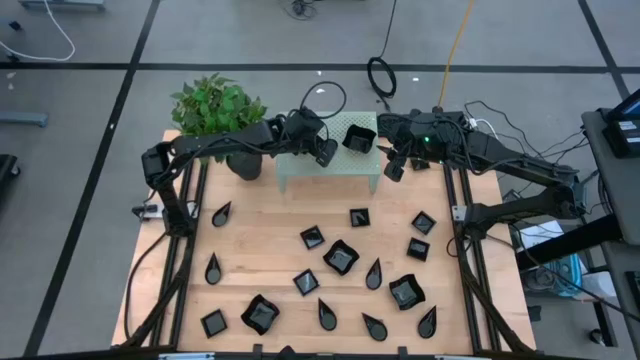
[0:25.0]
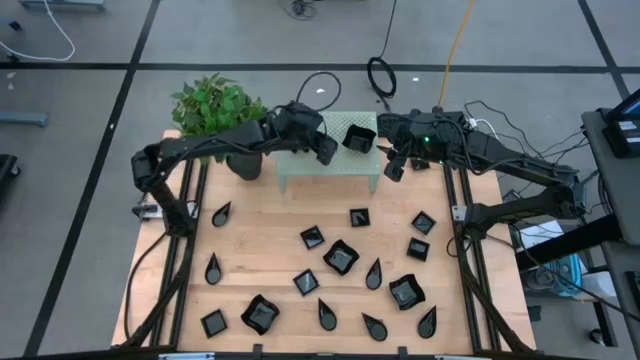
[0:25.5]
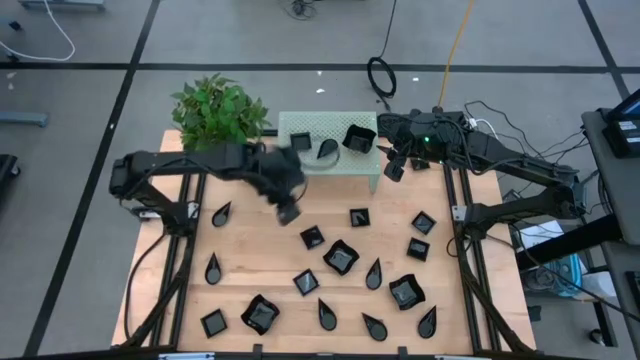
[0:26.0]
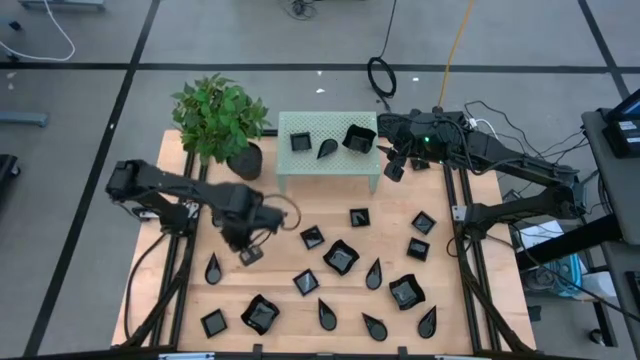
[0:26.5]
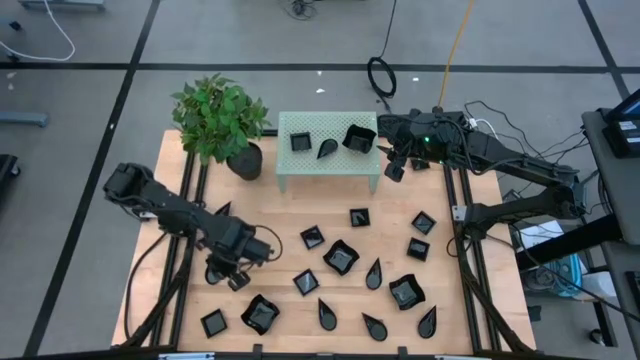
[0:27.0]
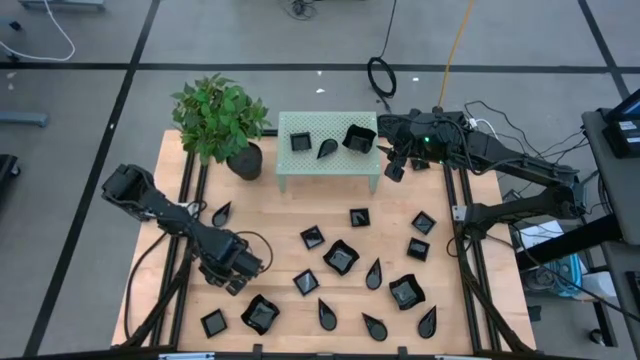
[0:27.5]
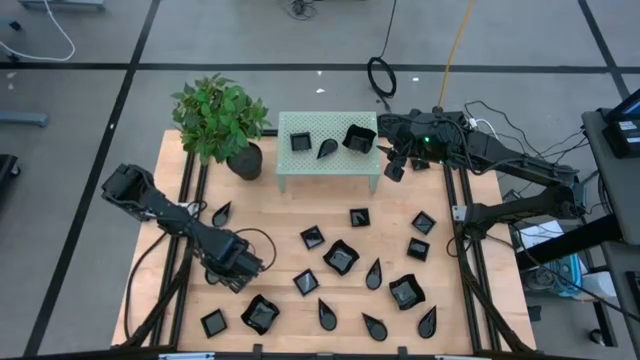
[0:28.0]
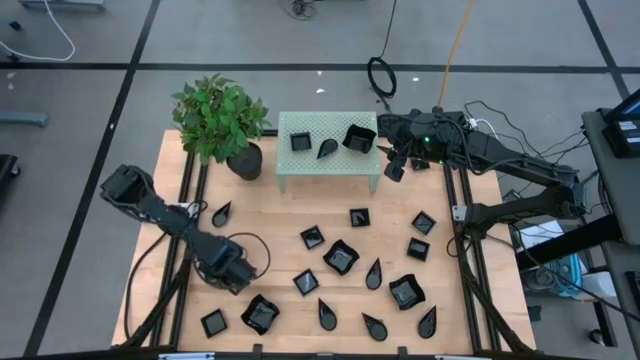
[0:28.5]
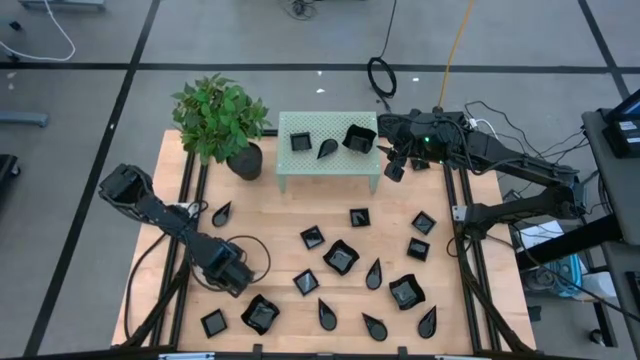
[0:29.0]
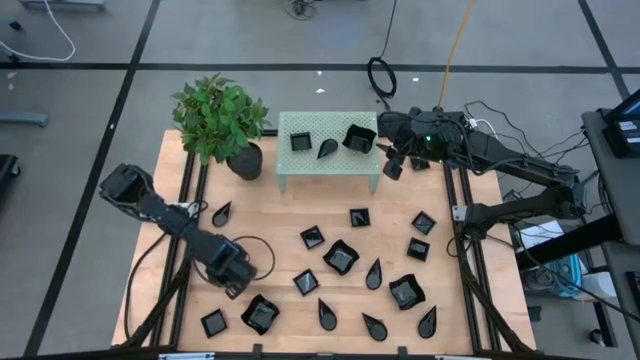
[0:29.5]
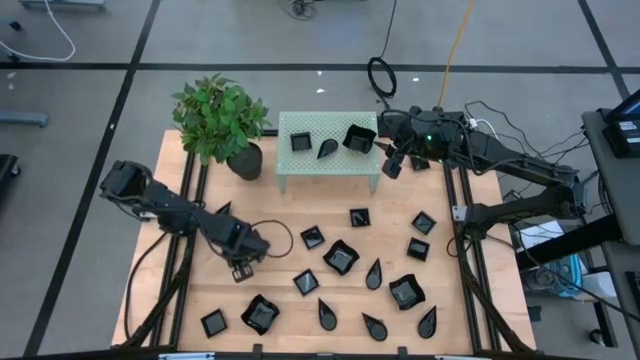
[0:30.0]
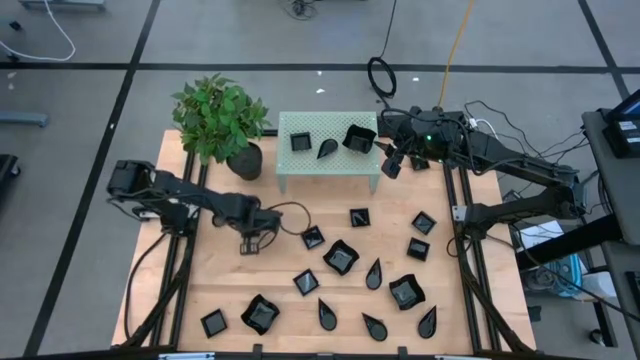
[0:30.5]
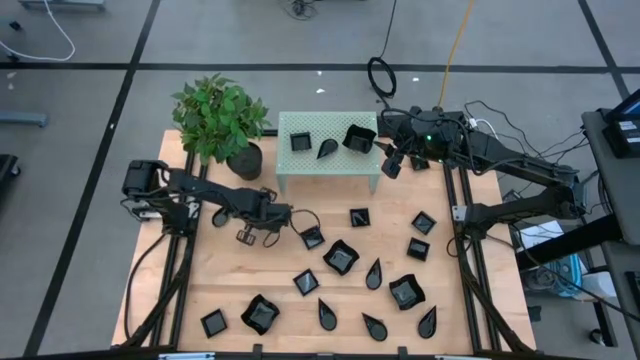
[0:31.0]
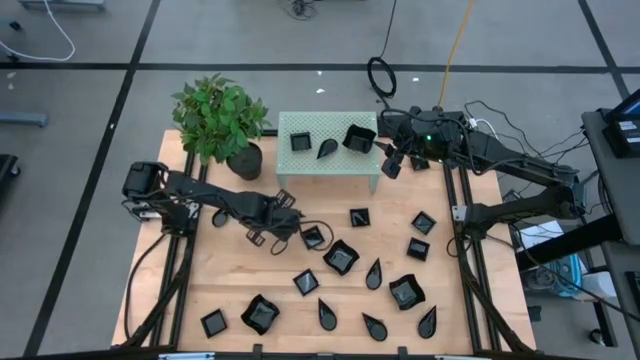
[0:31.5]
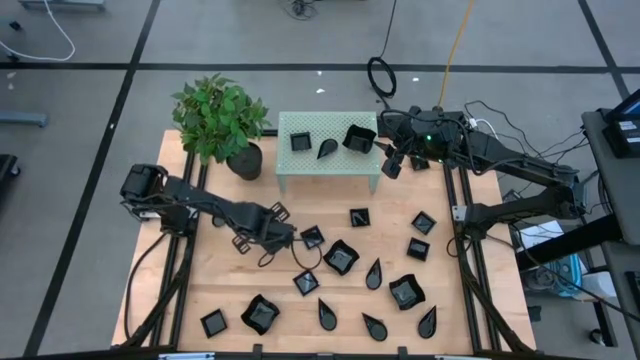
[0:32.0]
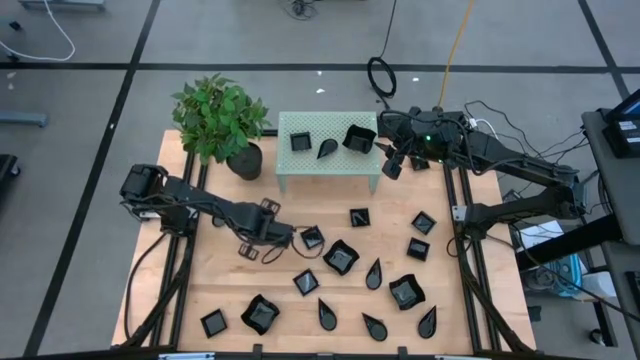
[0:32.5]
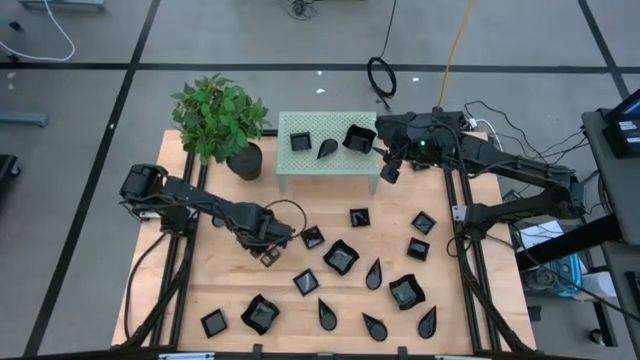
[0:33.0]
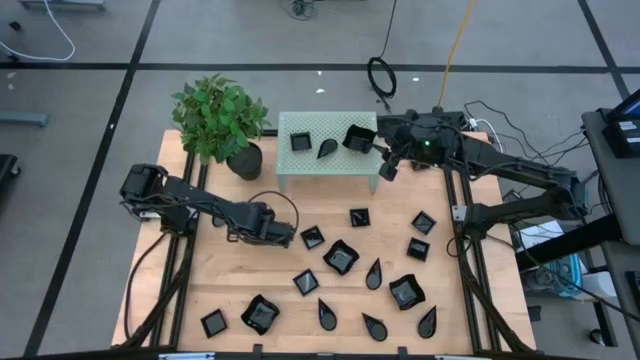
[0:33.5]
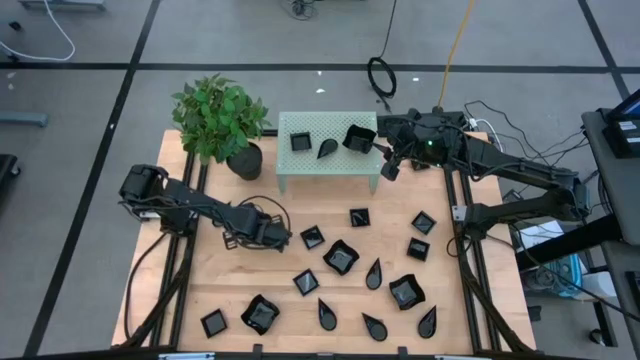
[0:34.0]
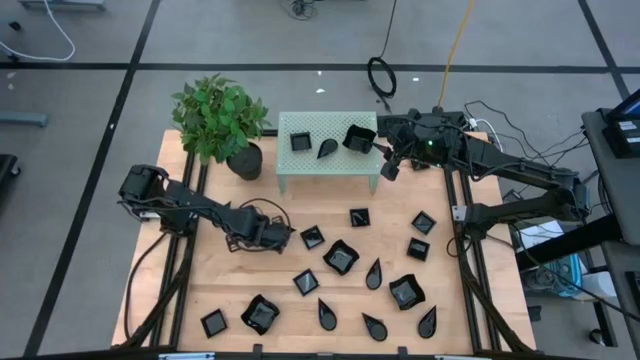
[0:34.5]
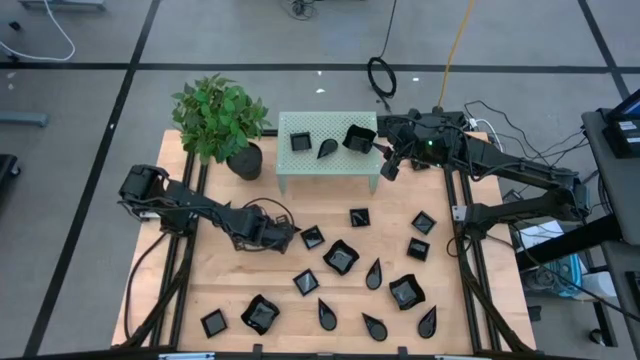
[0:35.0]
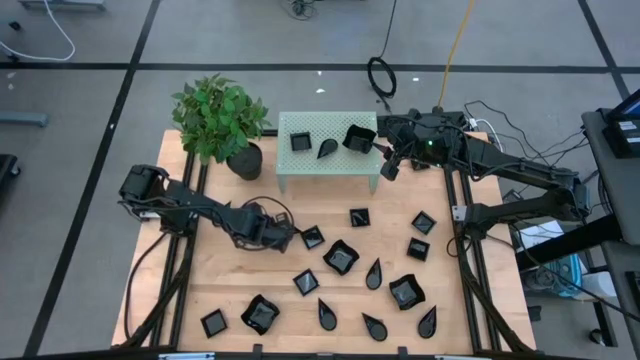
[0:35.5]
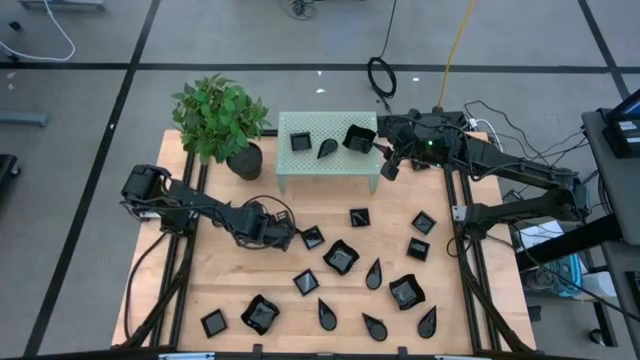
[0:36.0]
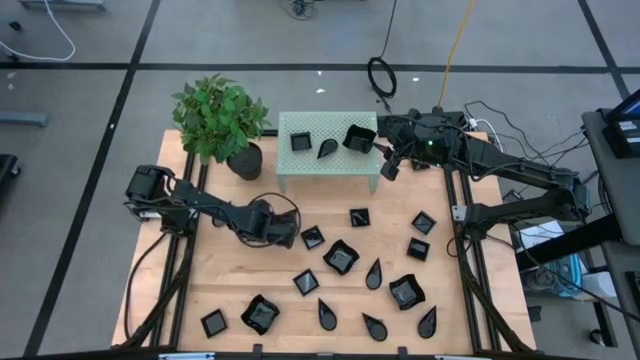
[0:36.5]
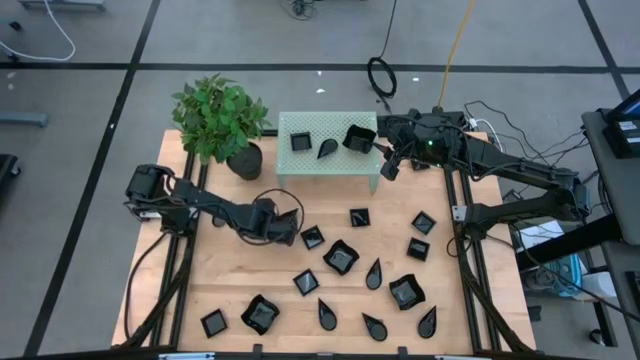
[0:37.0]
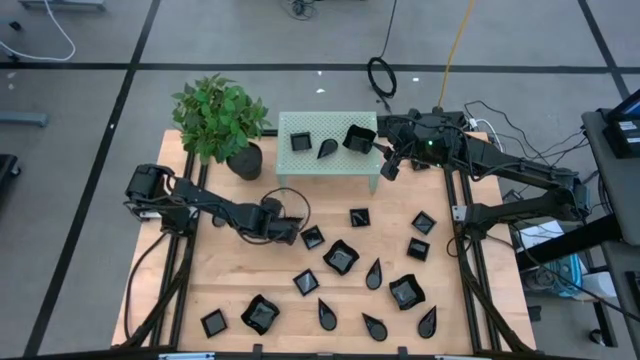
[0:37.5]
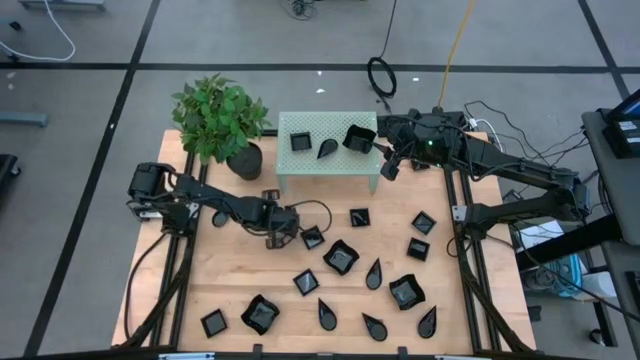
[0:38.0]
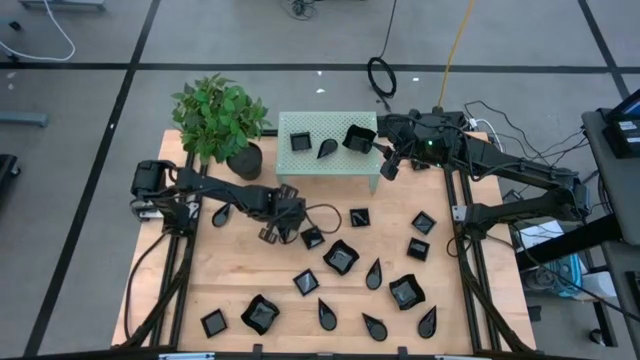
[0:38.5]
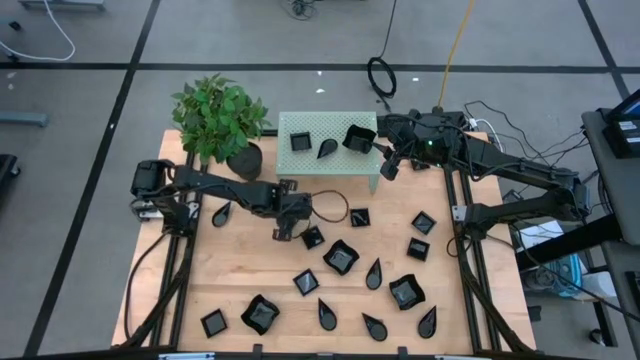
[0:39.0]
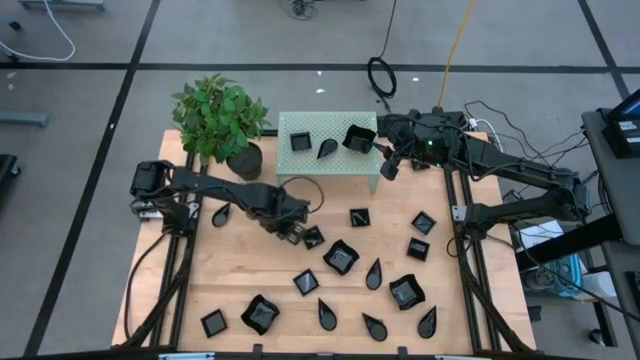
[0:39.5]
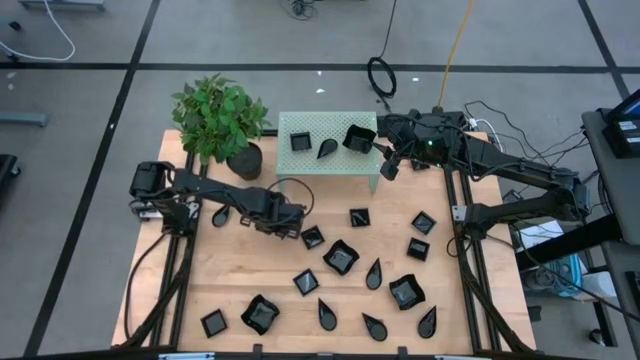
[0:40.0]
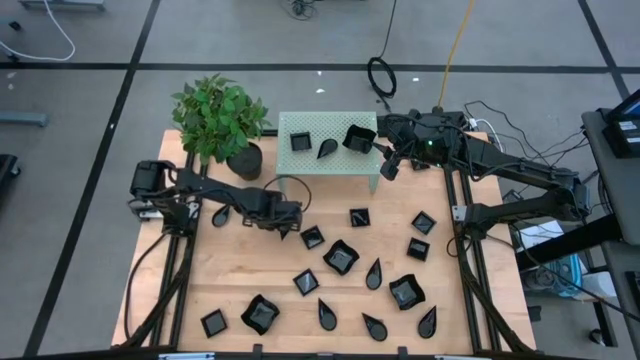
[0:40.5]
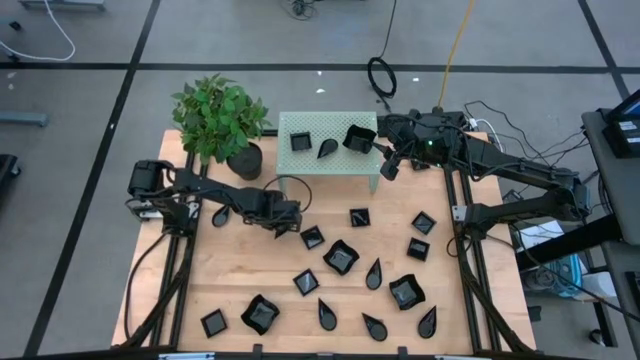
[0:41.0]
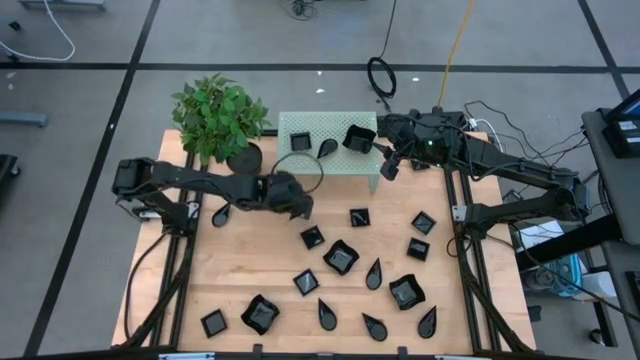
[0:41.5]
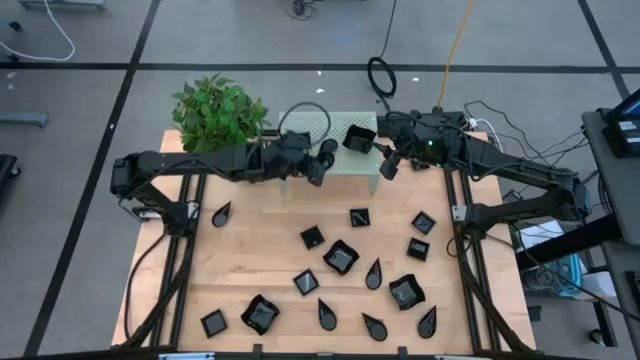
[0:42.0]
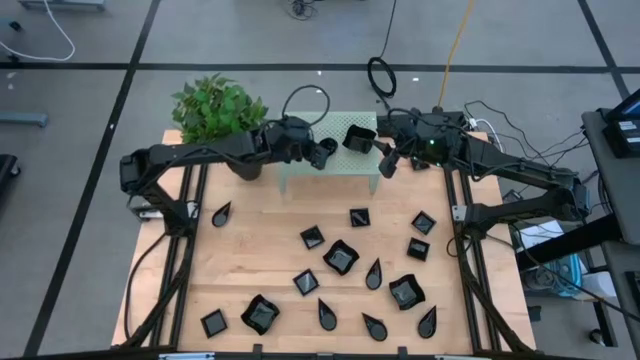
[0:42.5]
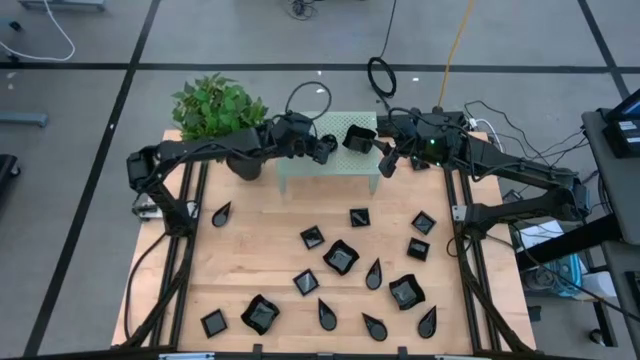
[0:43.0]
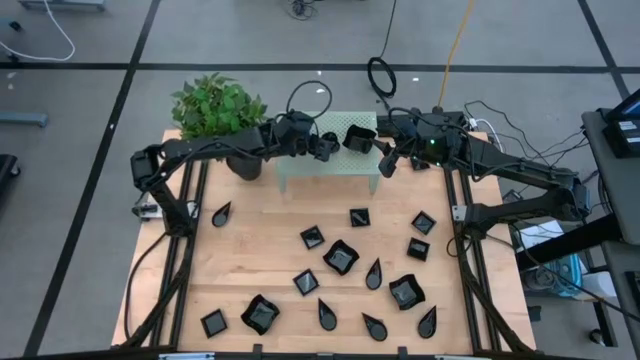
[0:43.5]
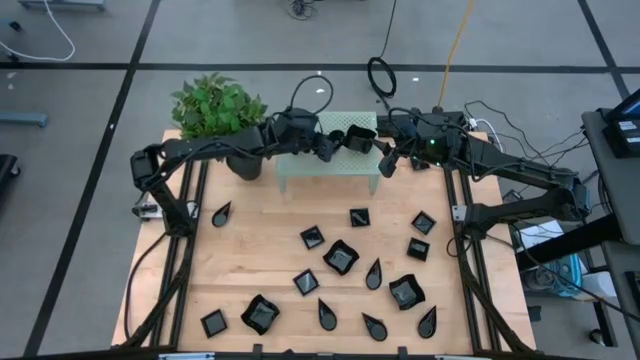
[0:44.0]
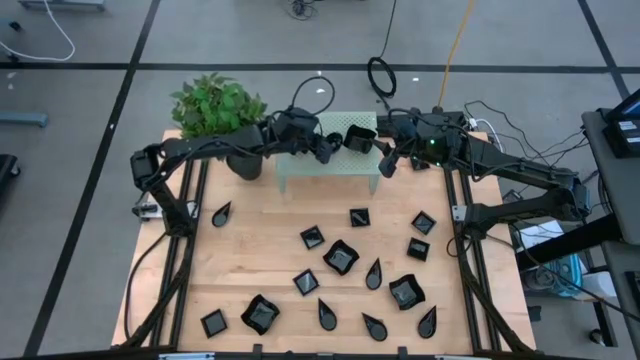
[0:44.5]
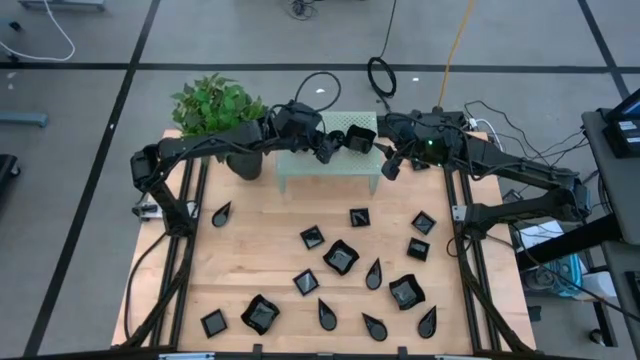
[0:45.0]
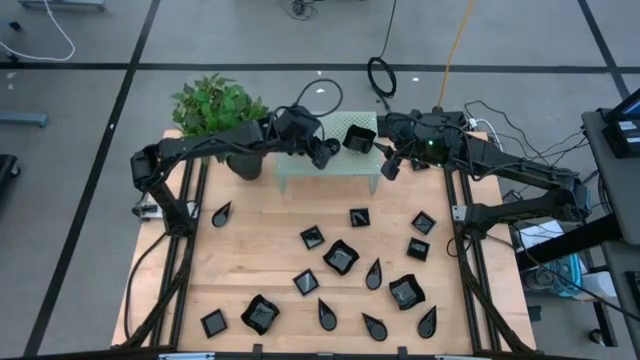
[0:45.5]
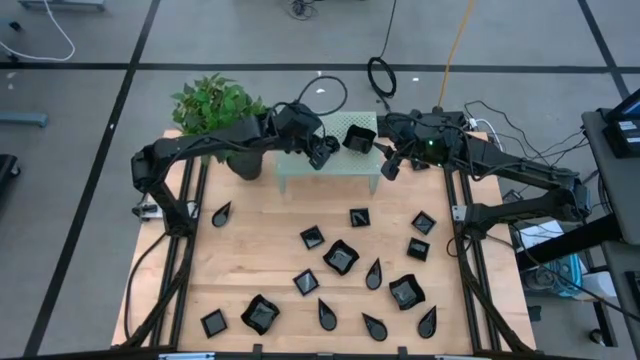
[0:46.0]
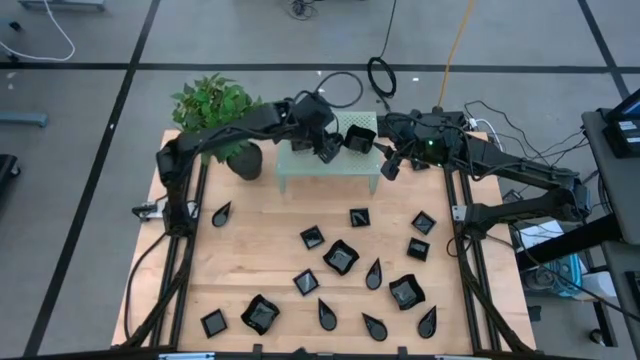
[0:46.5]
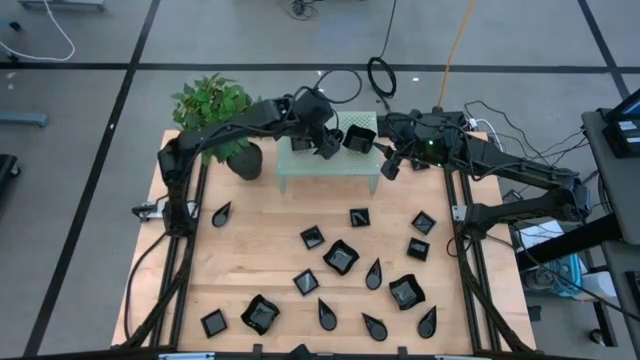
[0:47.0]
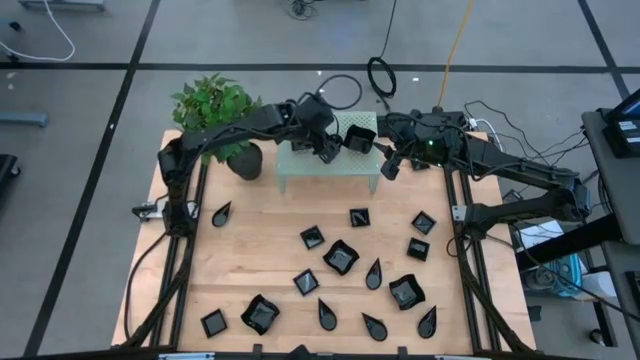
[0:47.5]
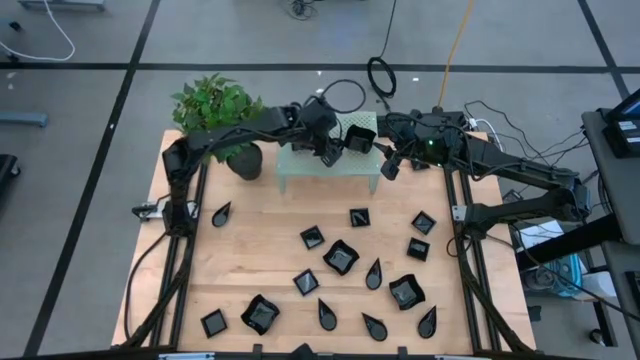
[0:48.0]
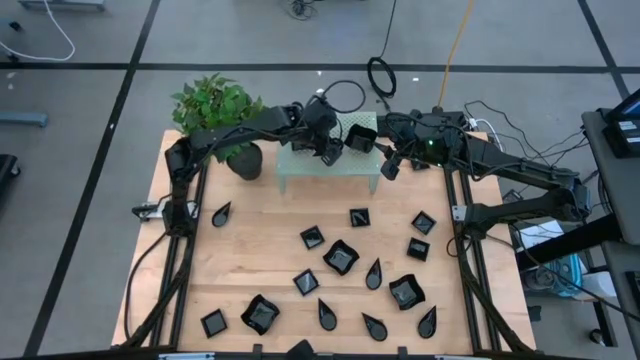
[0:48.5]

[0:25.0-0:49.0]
Task: Pick & Place Mini shaped plates
Stack the drop shaped plate on top of the other drop shaped plate on the shelf
